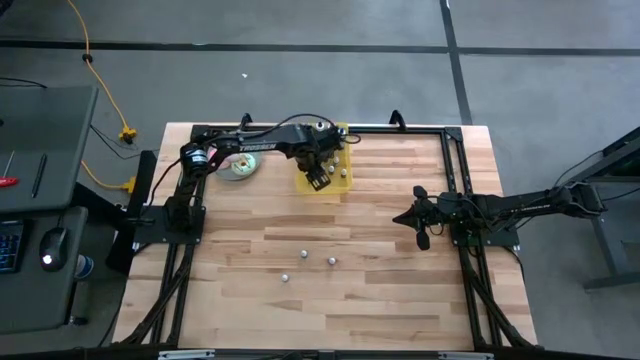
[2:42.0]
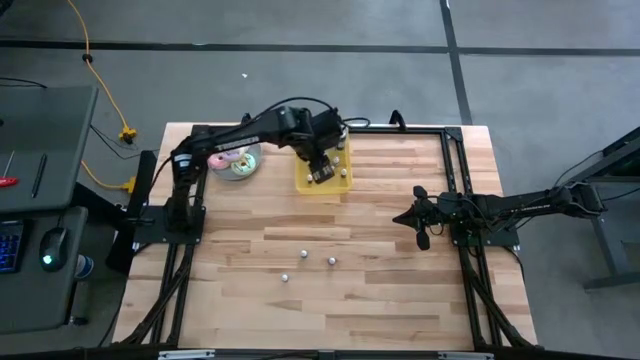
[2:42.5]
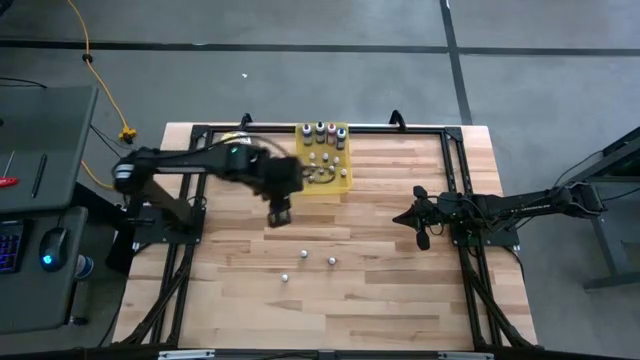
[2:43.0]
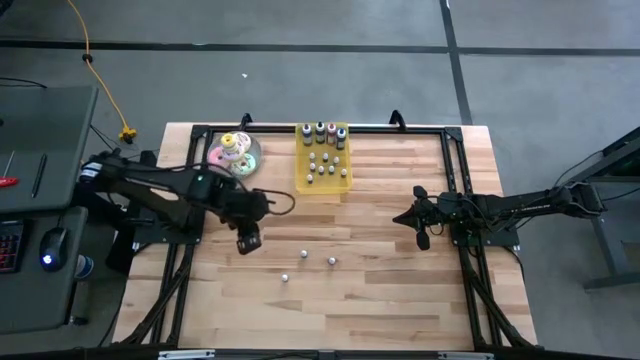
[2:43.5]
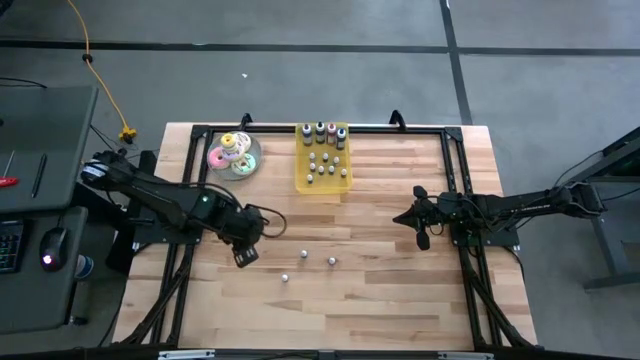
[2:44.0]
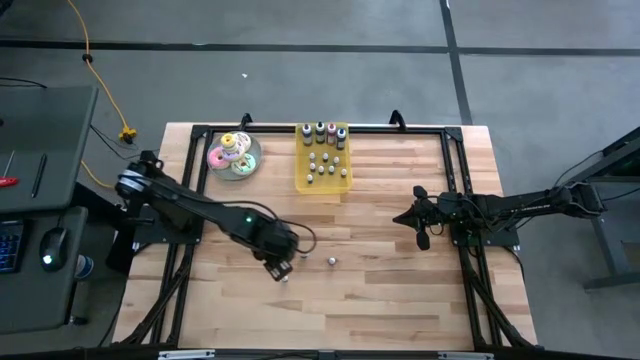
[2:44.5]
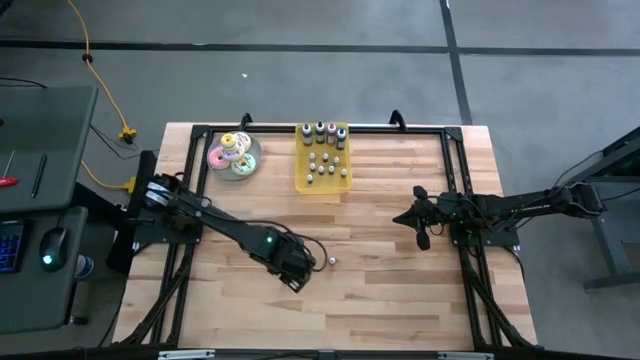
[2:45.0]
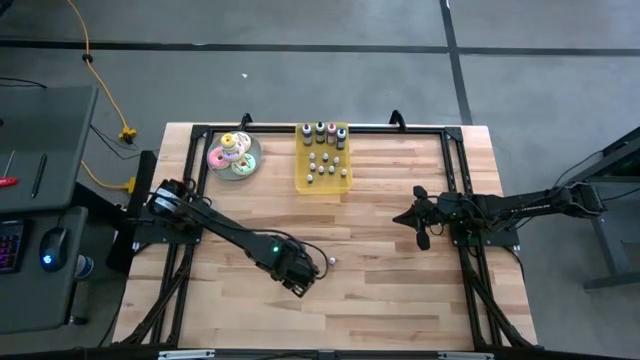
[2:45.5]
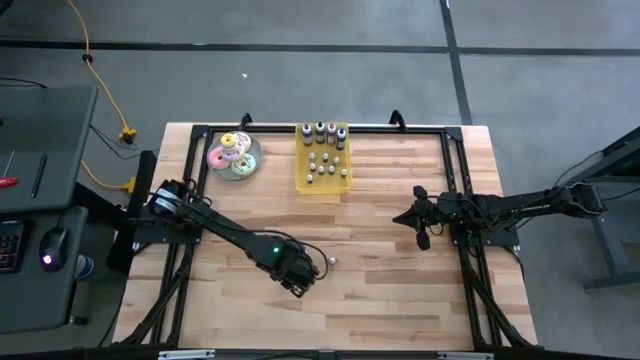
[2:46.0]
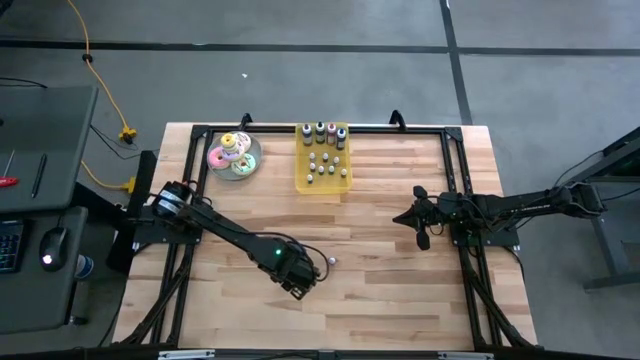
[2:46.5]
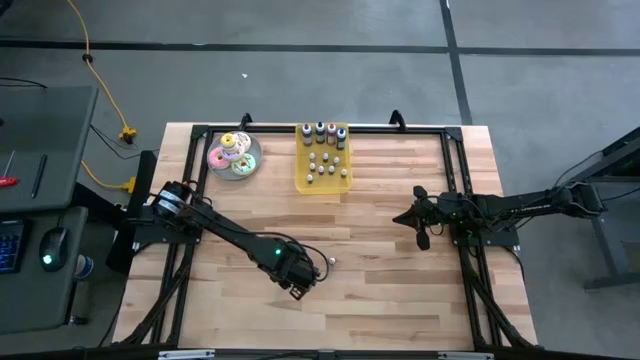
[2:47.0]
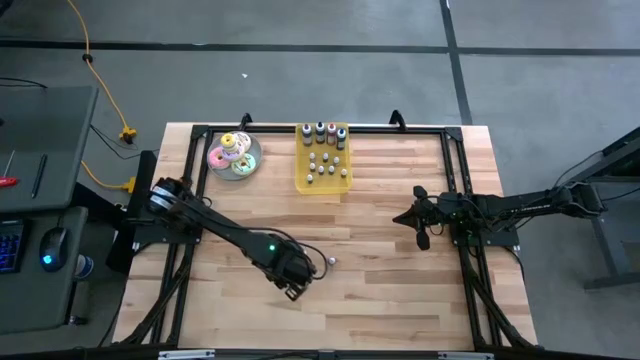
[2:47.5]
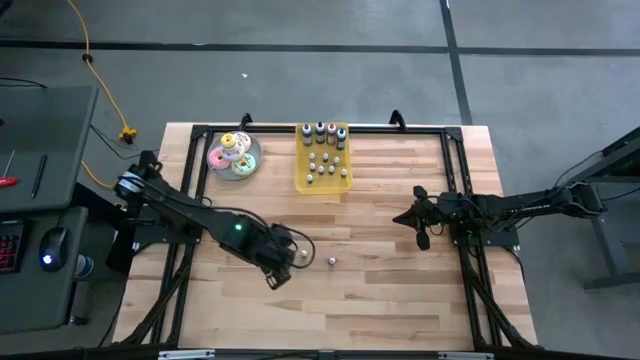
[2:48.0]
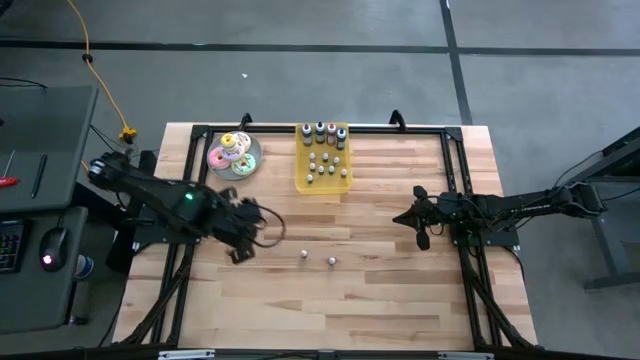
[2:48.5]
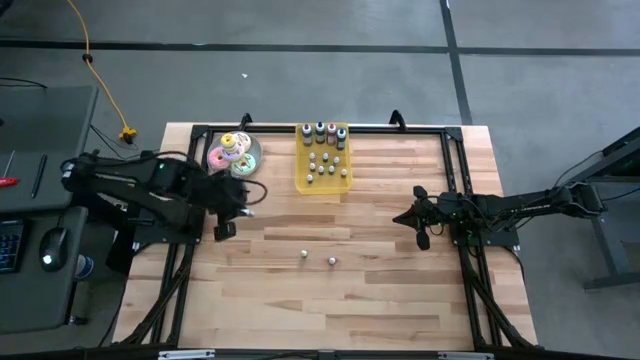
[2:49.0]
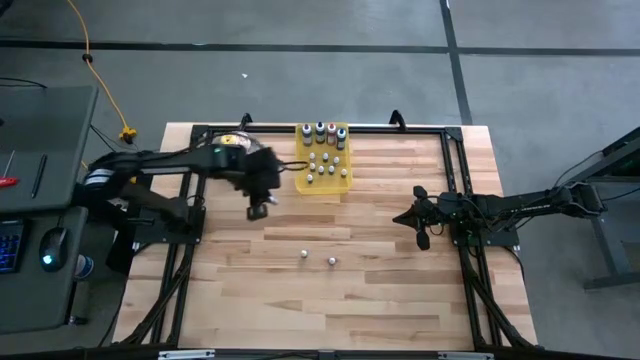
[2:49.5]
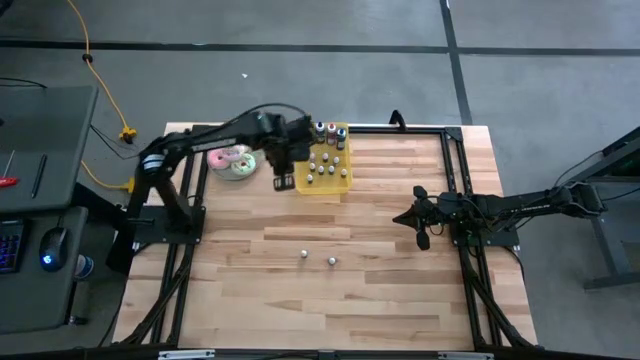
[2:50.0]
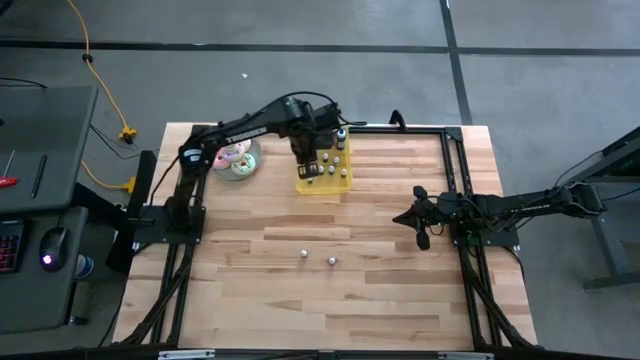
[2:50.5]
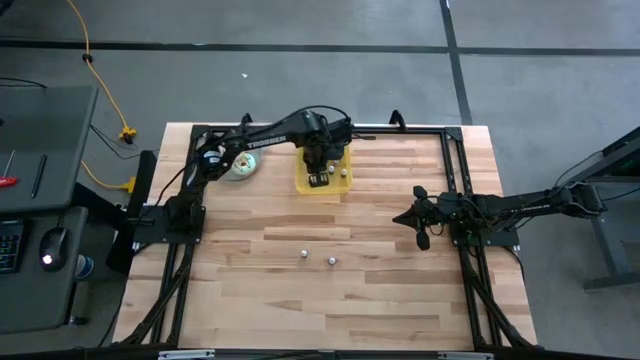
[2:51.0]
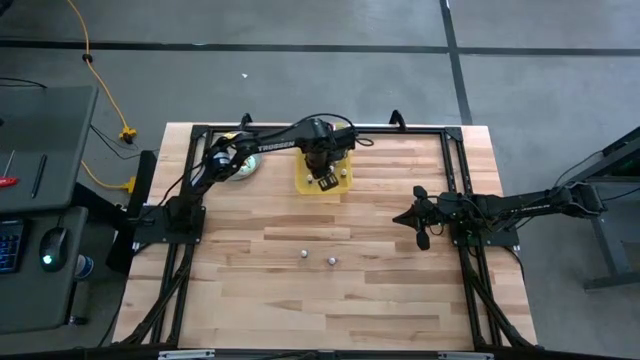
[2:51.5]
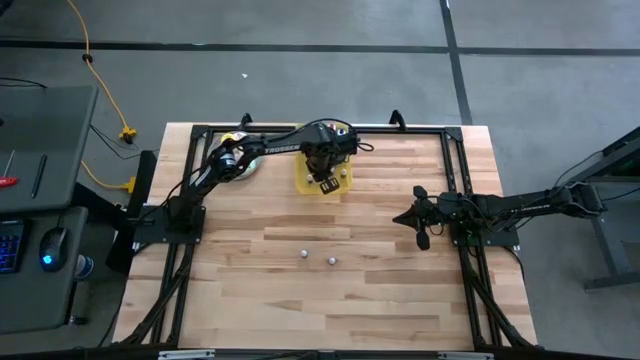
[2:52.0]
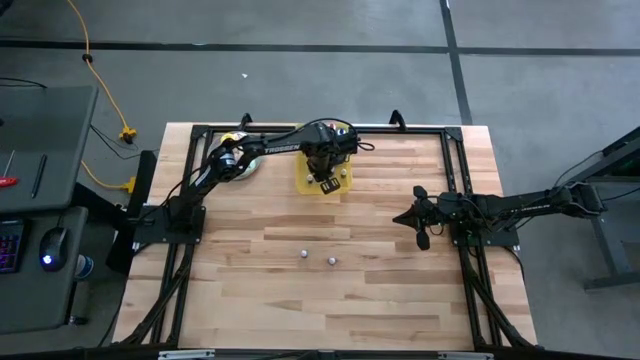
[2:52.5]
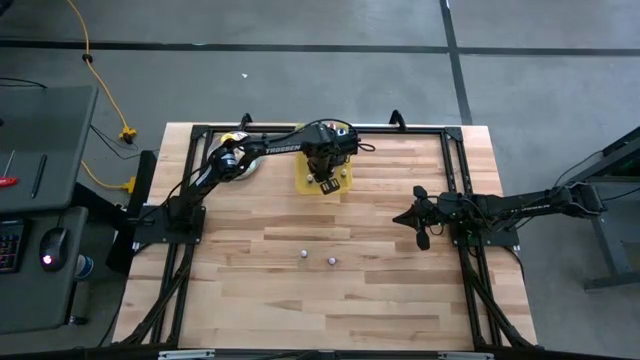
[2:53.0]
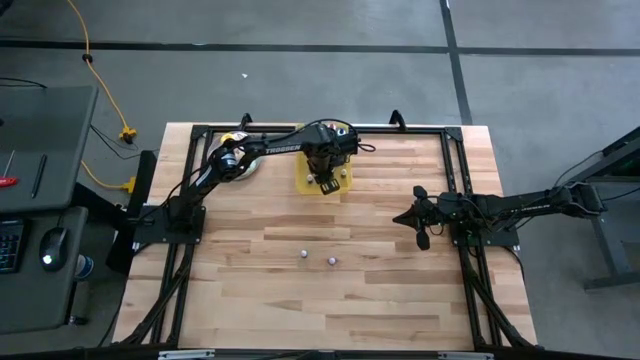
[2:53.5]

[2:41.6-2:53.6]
Task: Pick & Place food coloring
Put the small orange food coloring bottle into the yellow bin

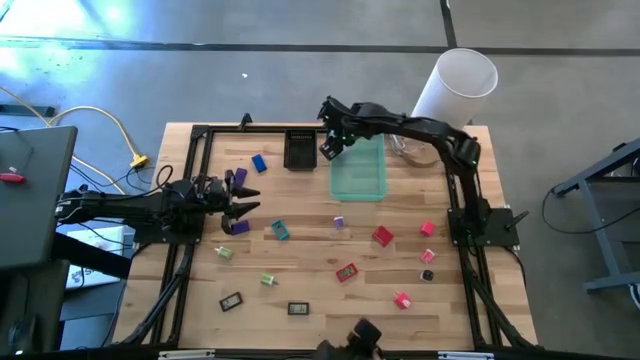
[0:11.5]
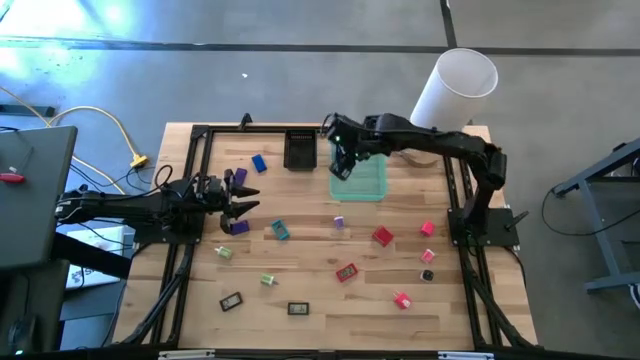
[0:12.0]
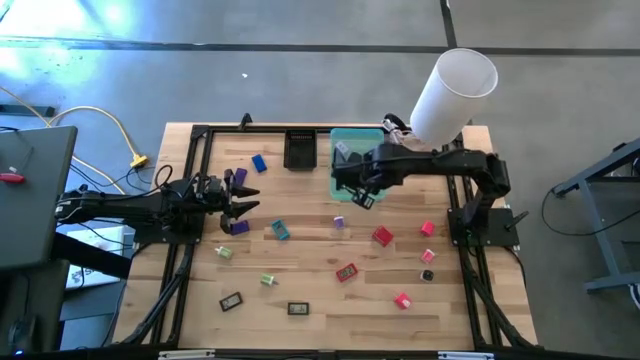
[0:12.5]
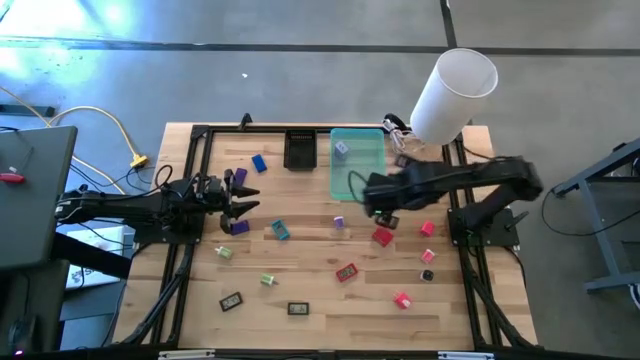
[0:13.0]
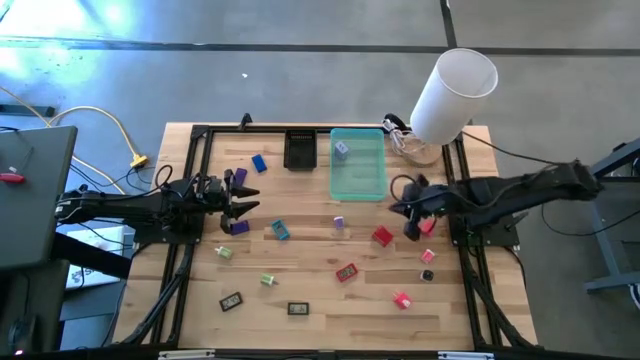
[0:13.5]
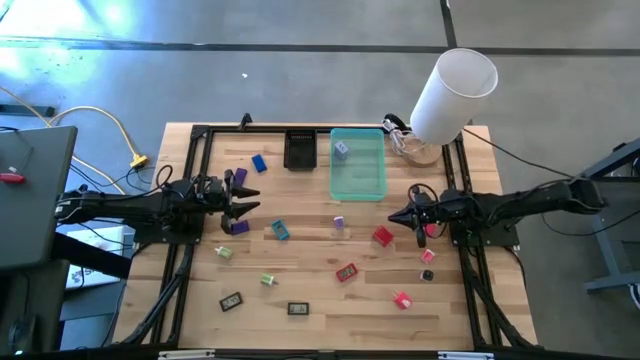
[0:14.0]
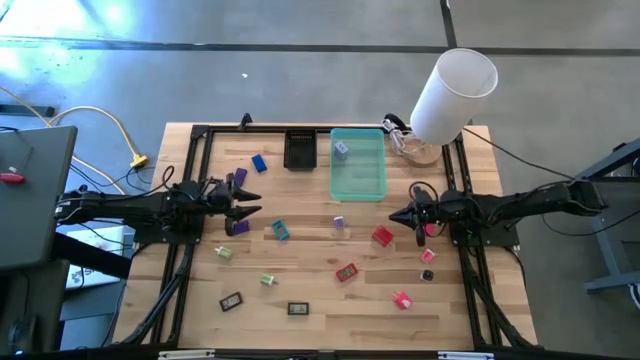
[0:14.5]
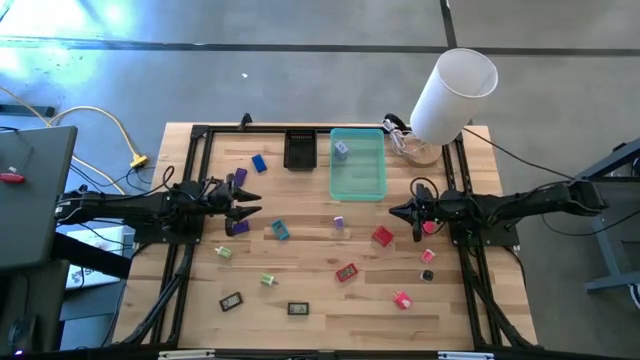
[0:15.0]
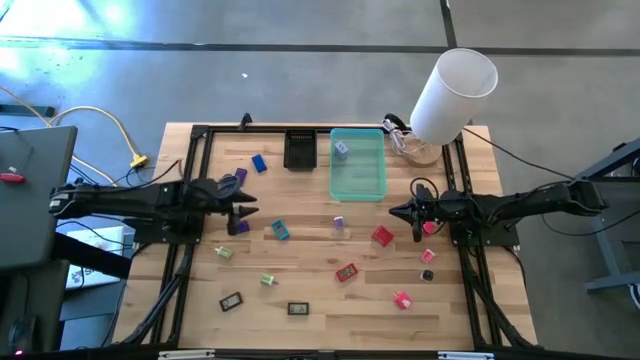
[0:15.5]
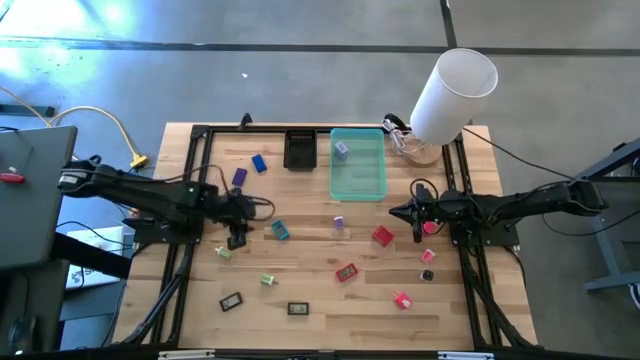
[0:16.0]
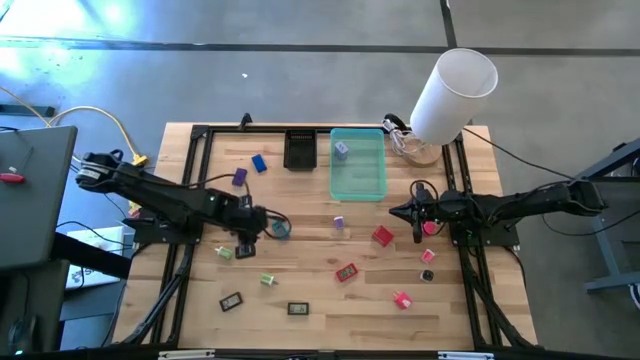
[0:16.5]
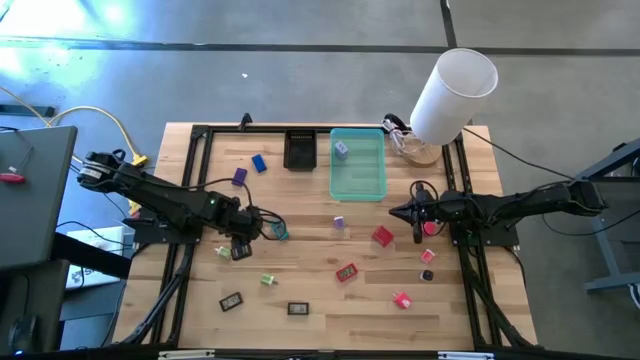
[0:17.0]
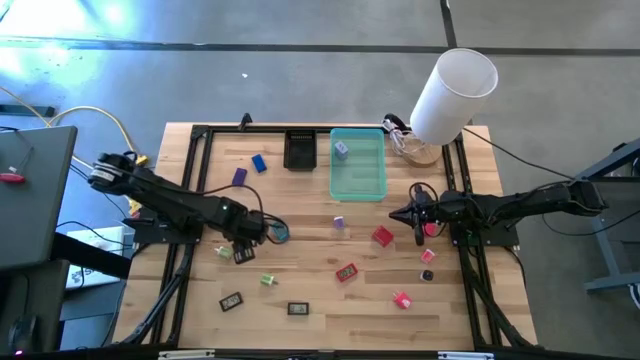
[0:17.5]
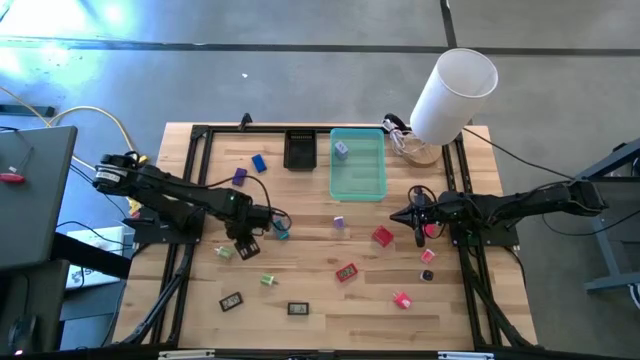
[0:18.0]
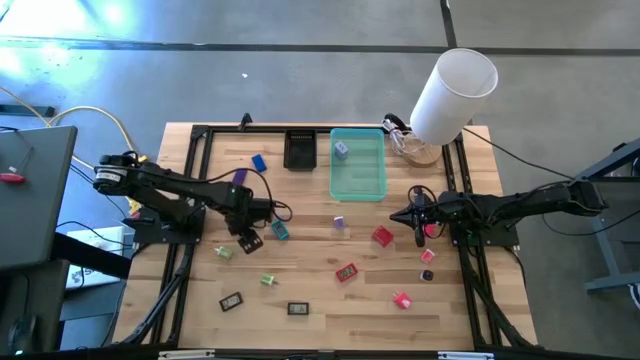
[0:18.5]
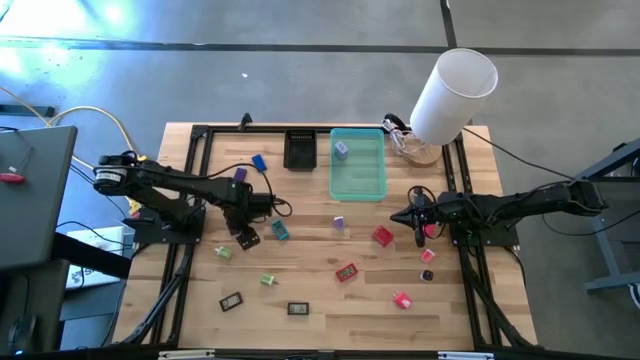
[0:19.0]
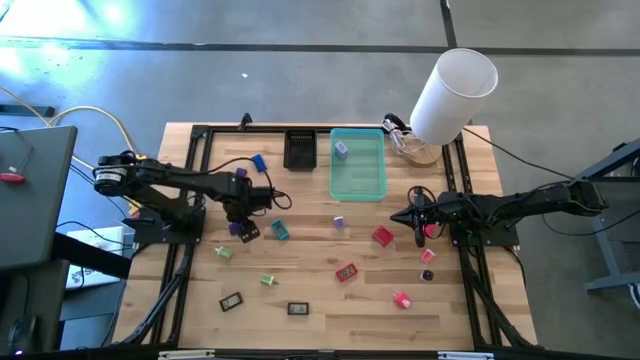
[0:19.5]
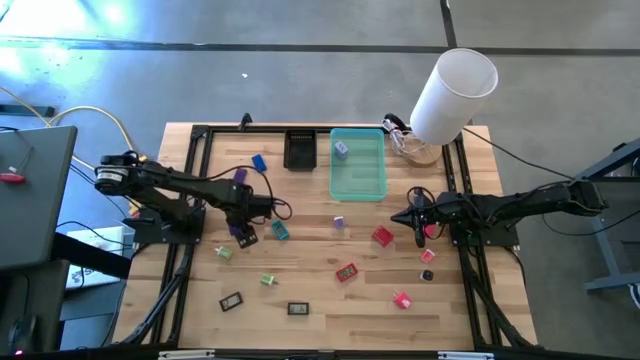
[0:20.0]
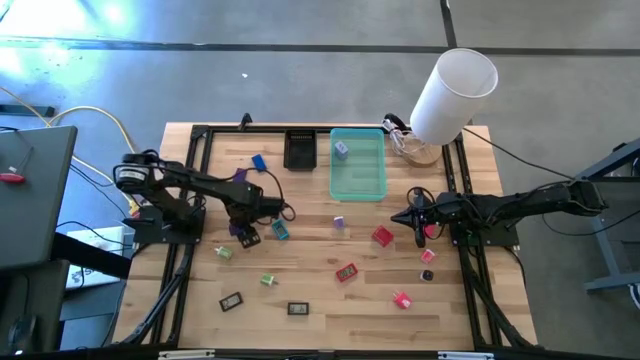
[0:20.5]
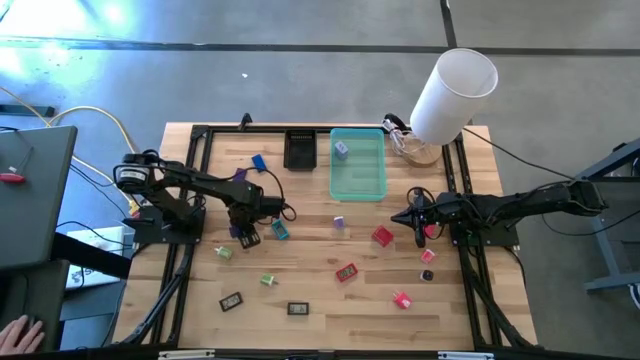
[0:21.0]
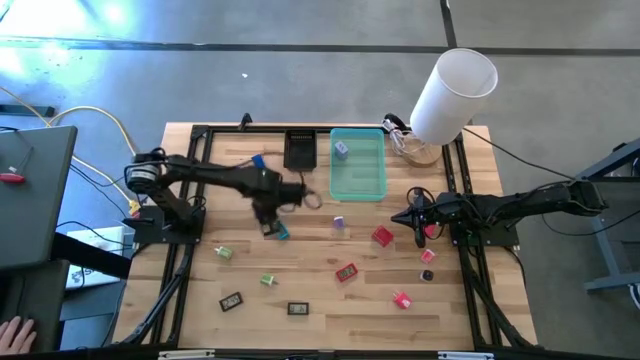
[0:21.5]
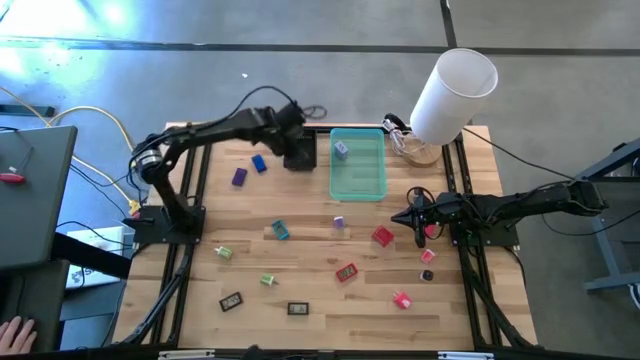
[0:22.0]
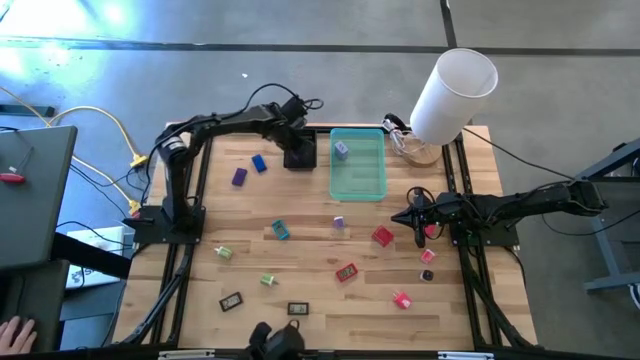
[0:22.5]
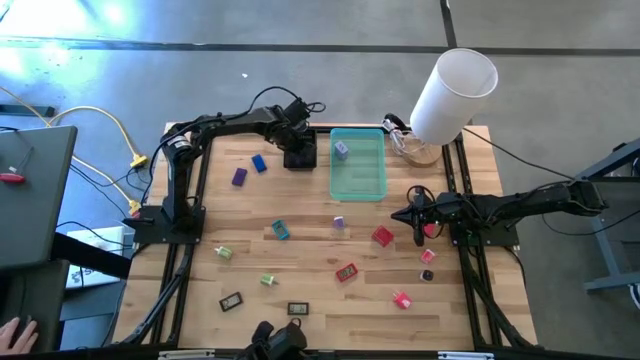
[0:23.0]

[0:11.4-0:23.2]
Task: Pick & Place Office items
Put the bottom violet digital timer into the black bin
